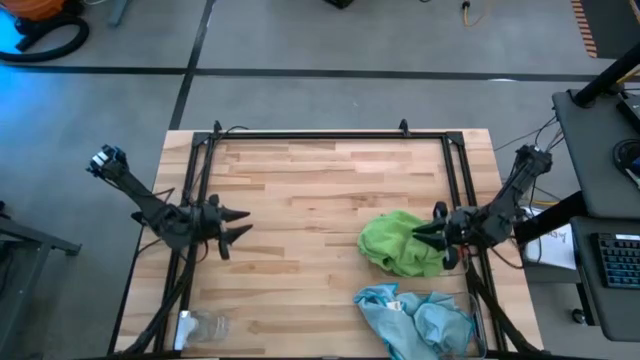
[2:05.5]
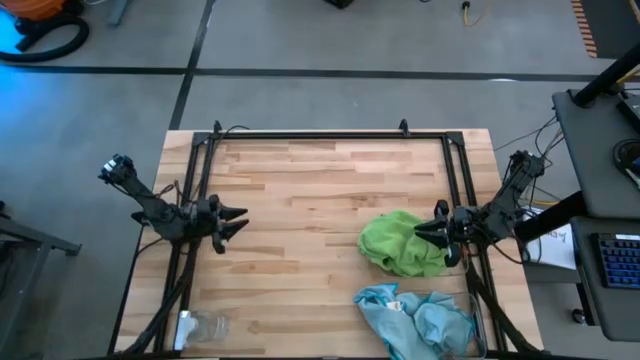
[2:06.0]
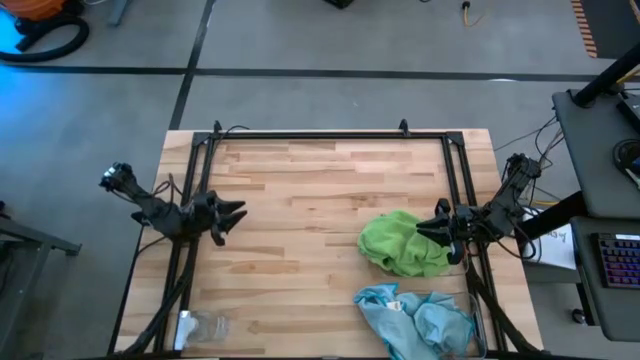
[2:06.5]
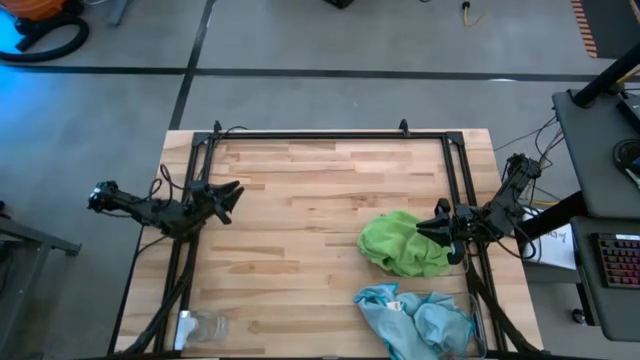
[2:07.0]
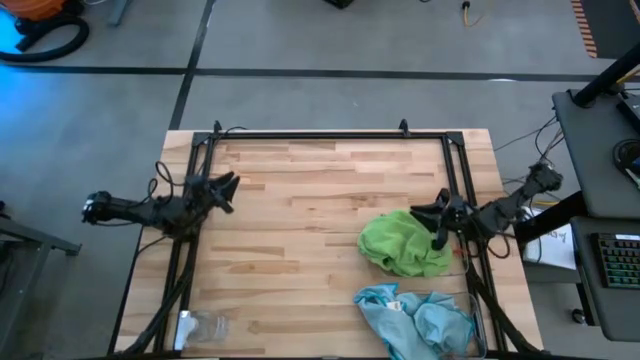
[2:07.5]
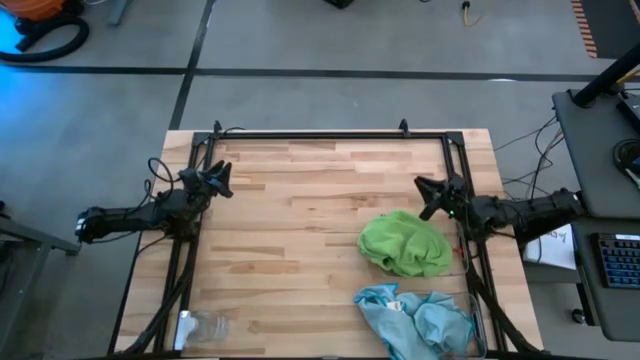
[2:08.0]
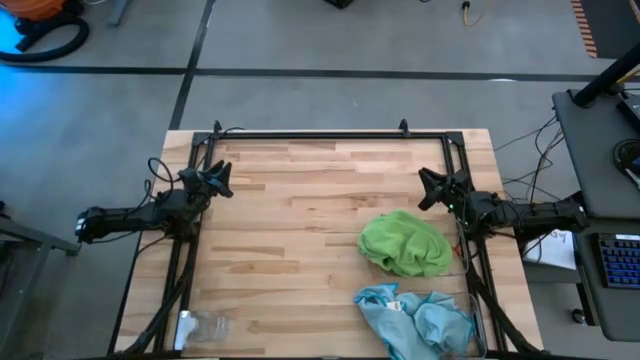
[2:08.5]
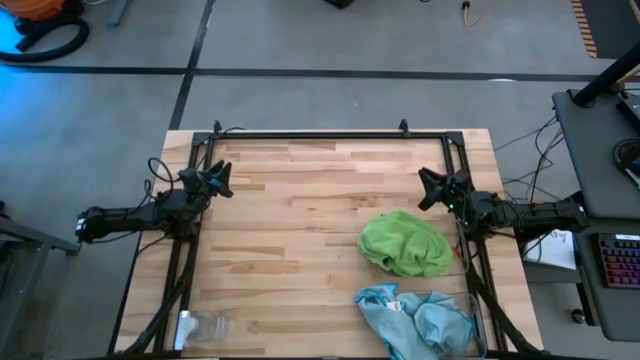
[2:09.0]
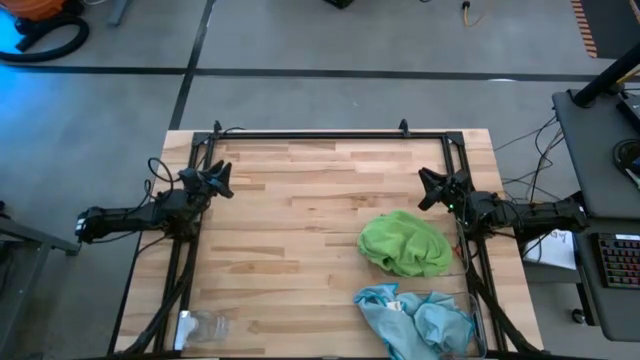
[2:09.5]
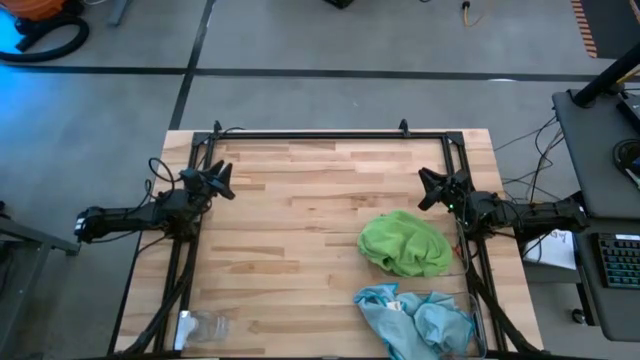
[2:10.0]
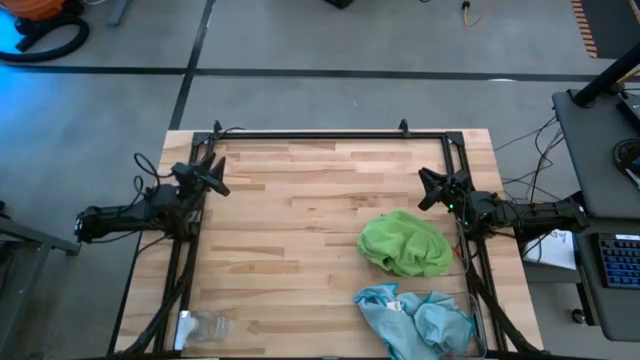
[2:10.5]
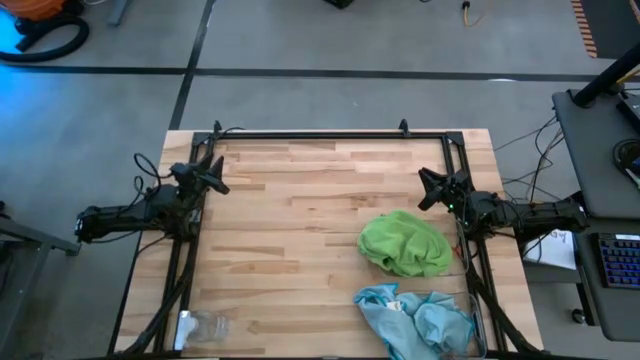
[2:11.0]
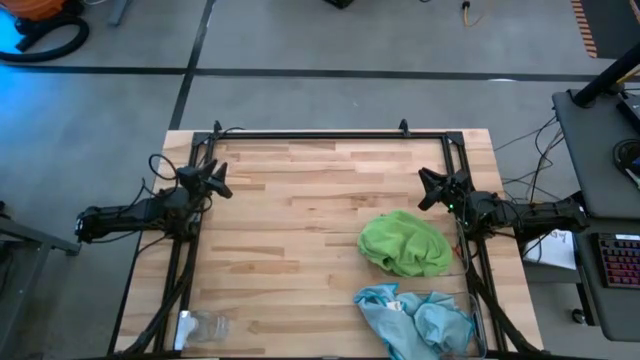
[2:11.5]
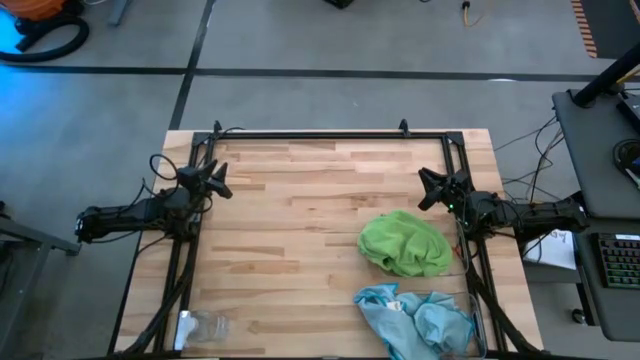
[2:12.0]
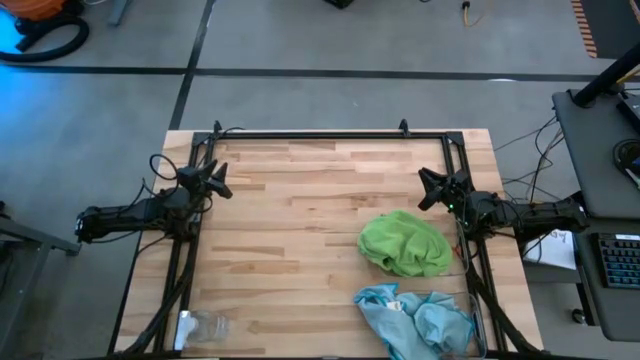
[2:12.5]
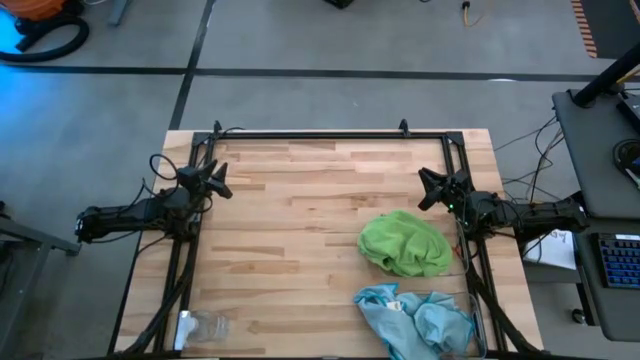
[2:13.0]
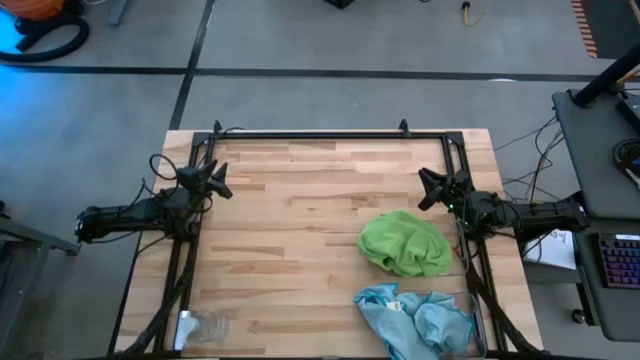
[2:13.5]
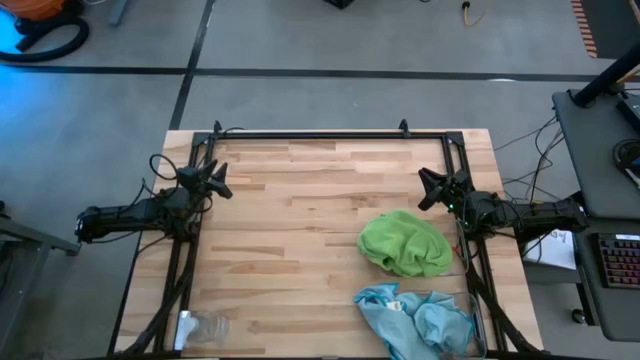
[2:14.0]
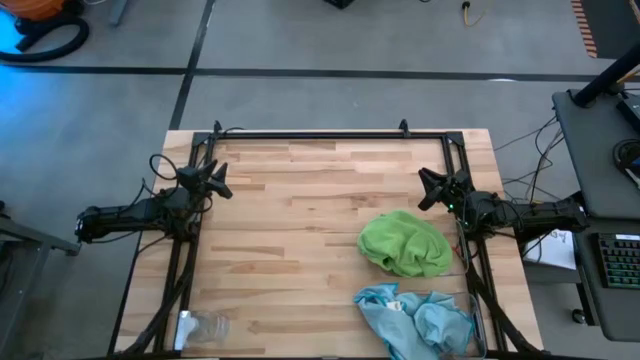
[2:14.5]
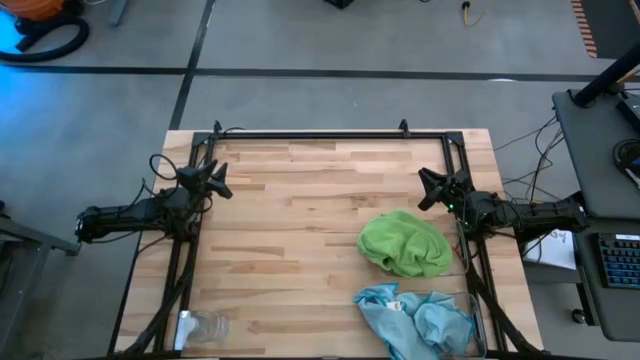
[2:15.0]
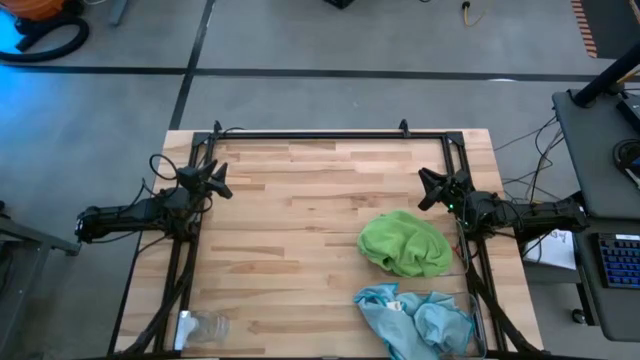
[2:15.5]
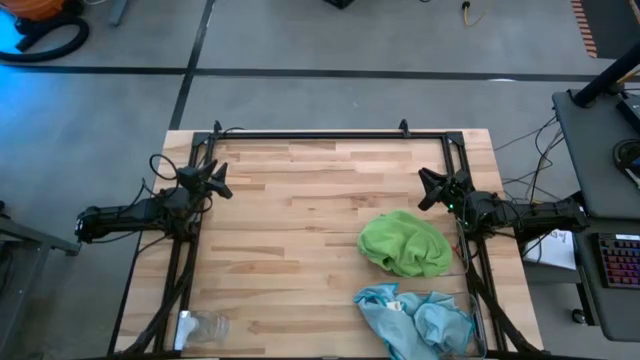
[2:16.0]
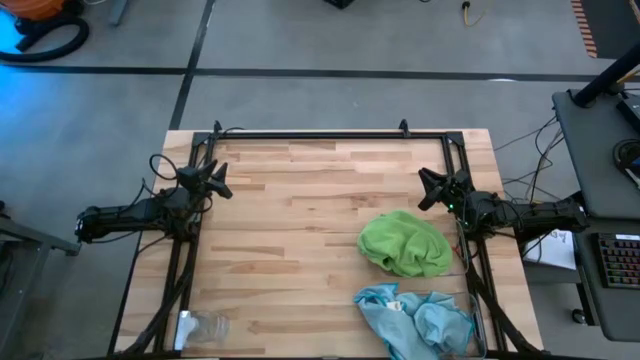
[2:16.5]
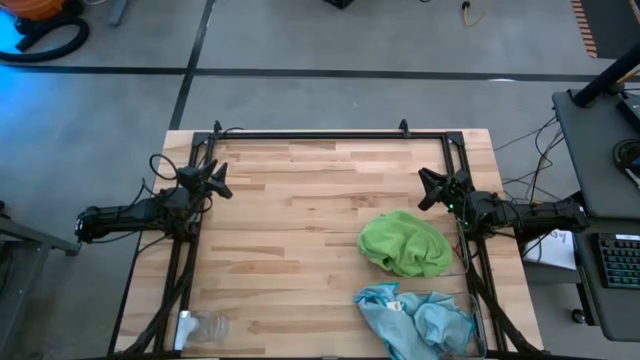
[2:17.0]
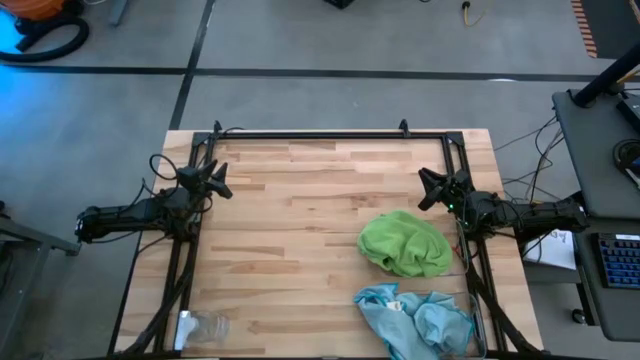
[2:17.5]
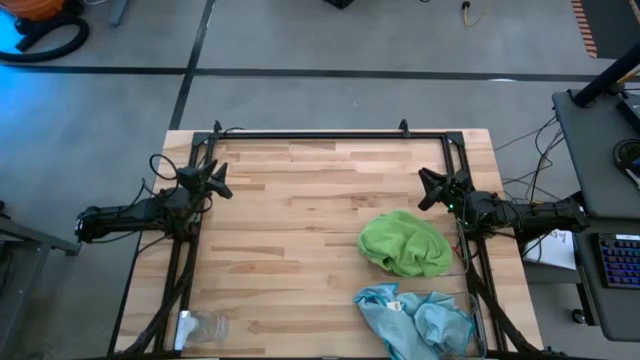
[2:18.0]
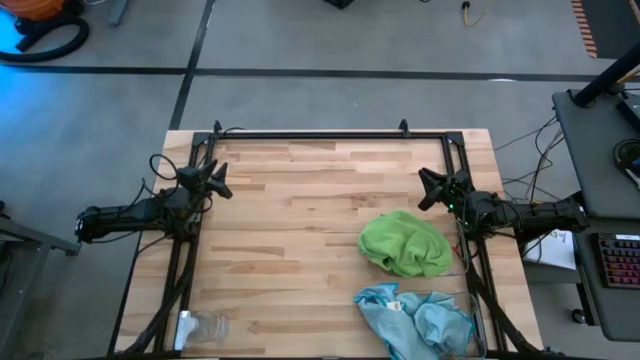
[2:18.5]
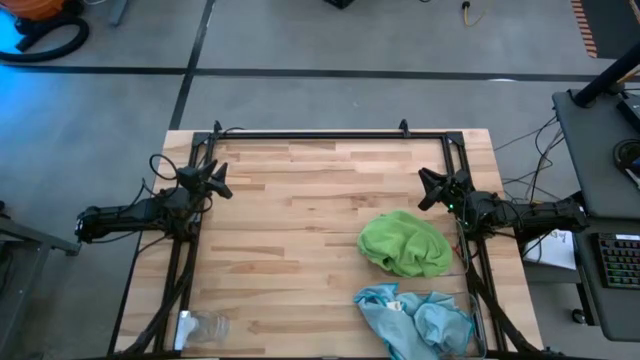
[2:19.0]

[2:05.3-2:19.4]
Task: Sort microfiber towel by color & place in baskets
Return to Home Position
